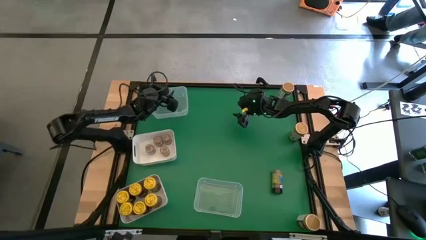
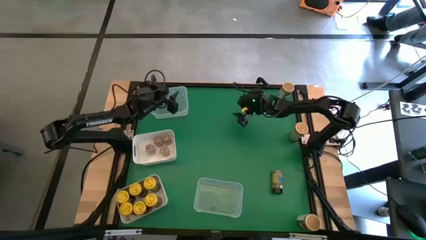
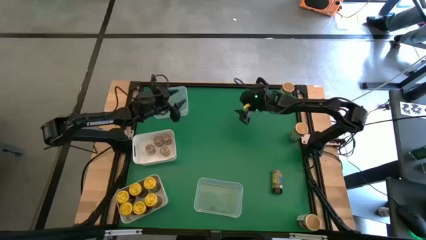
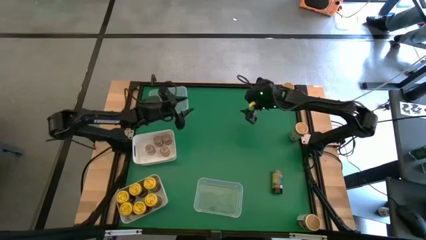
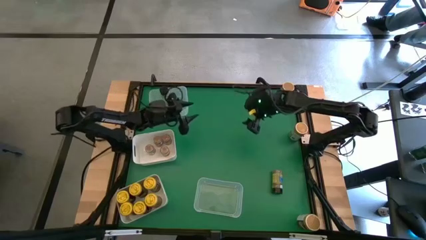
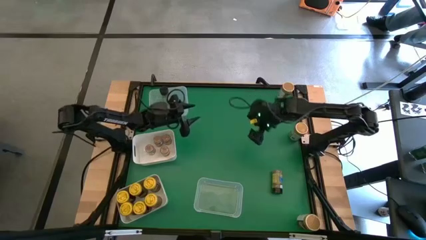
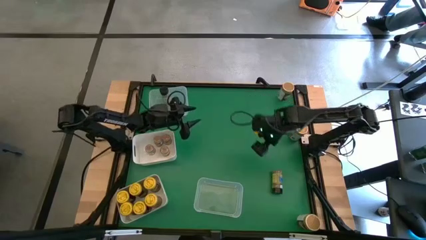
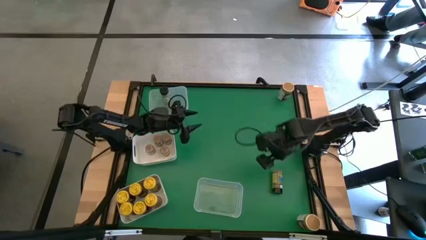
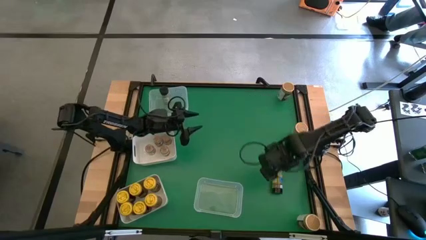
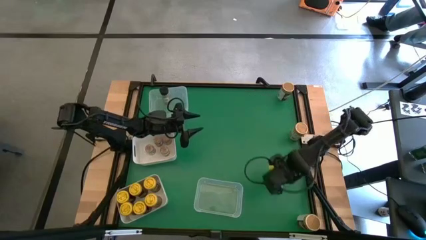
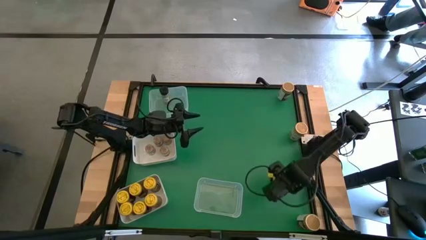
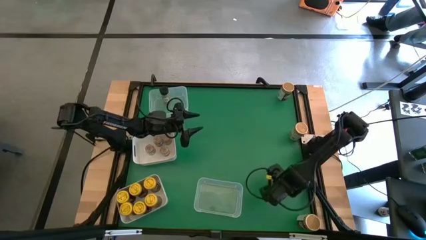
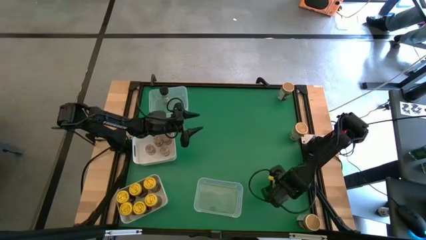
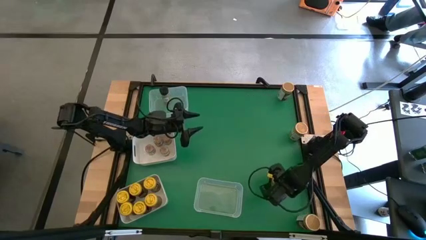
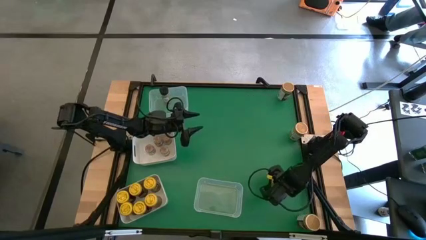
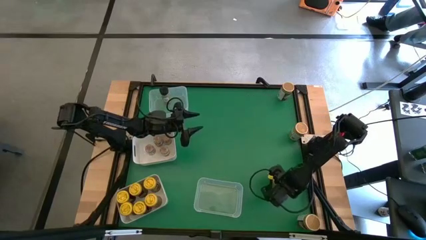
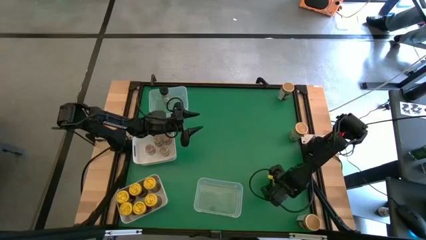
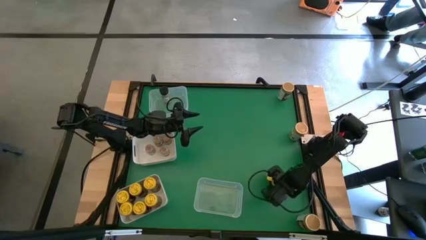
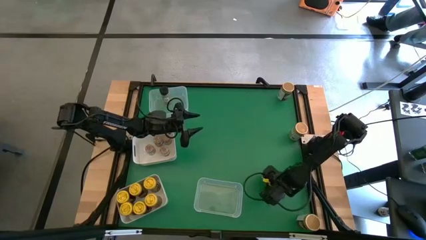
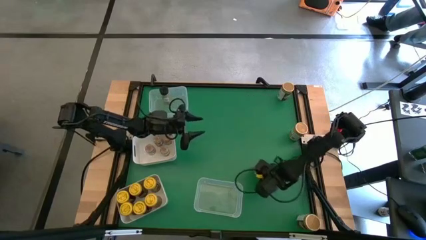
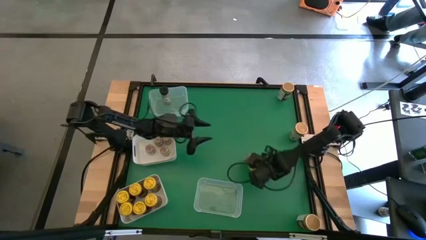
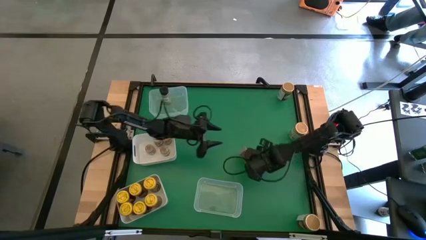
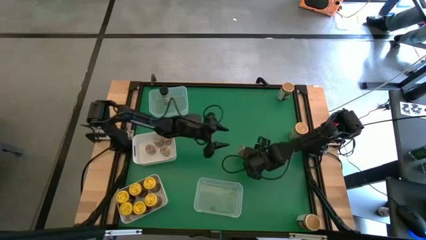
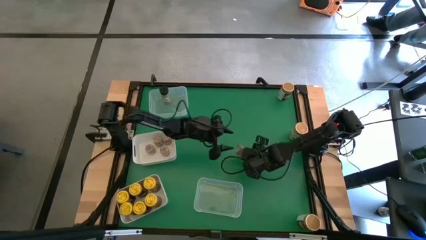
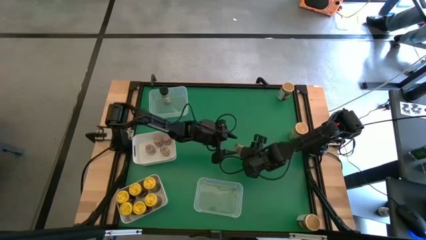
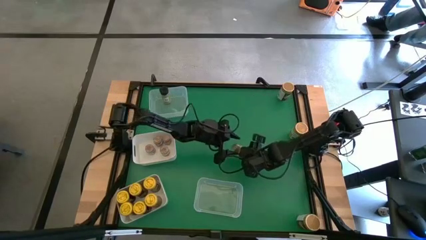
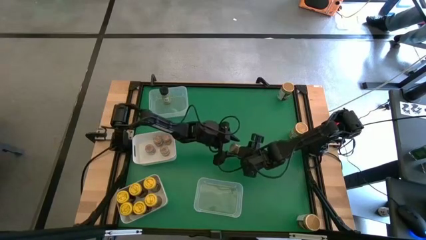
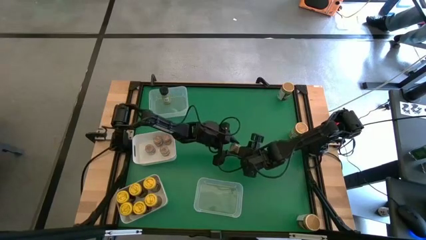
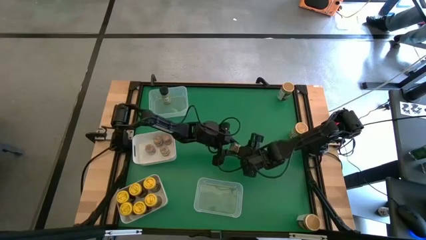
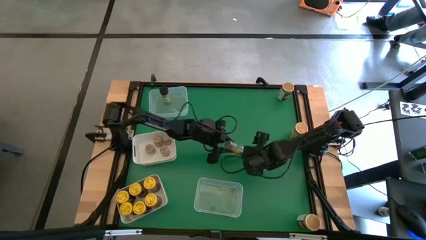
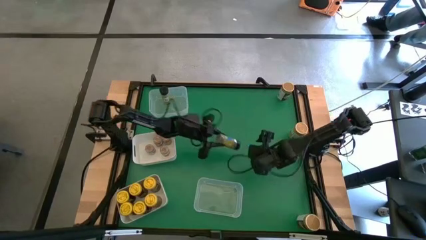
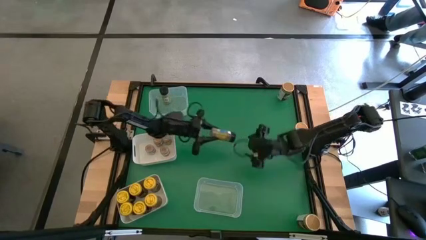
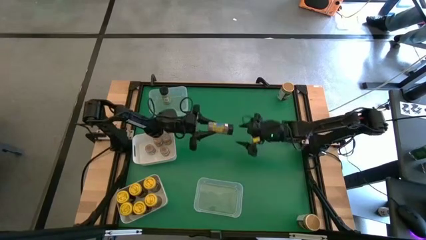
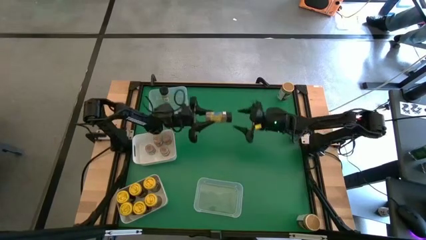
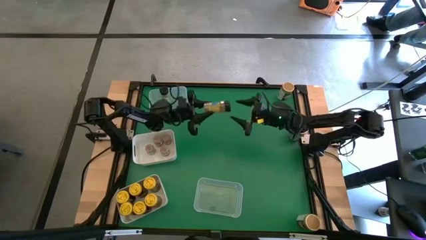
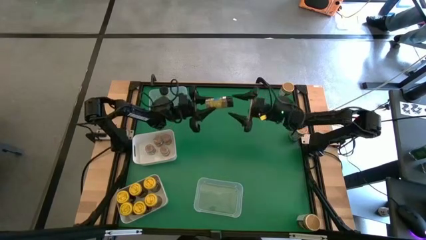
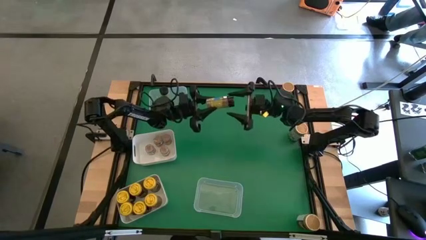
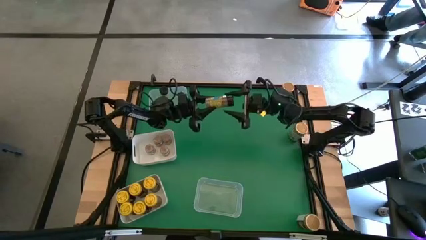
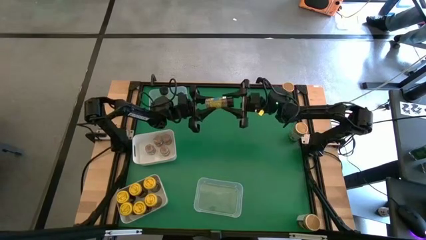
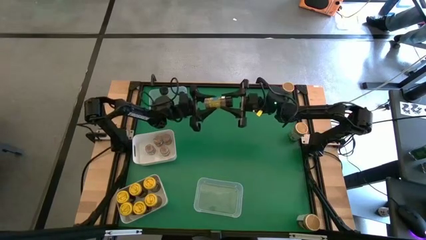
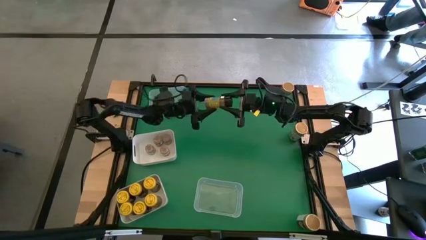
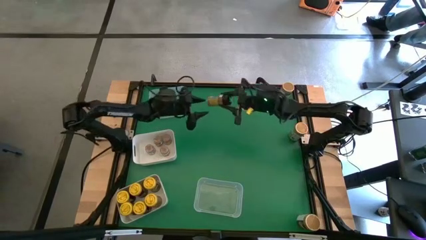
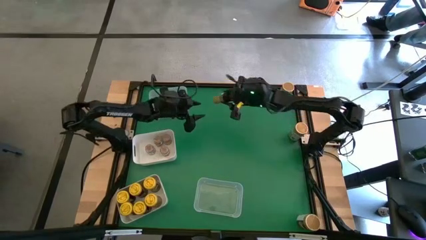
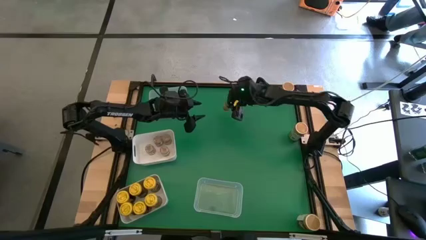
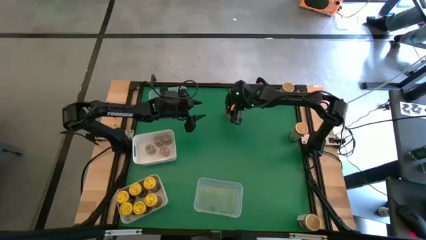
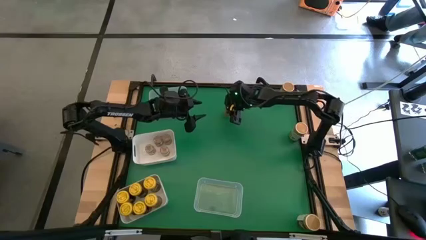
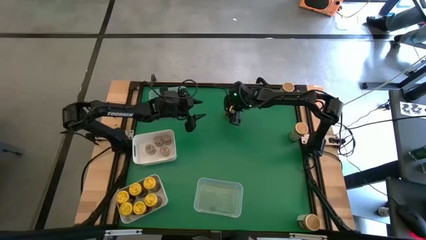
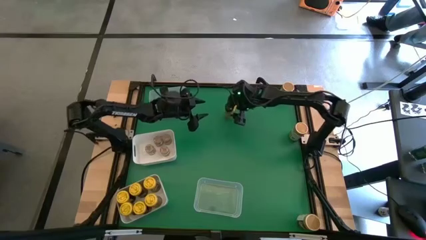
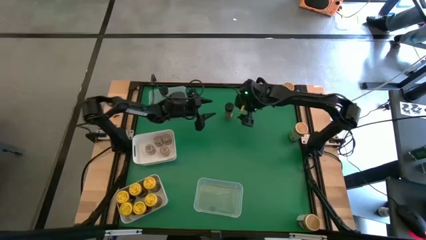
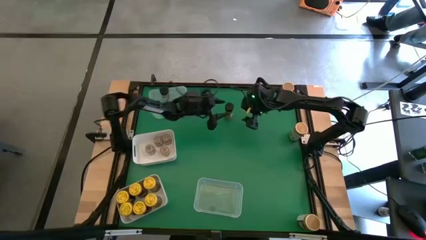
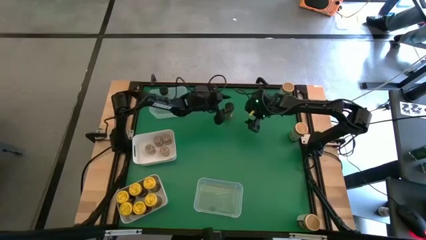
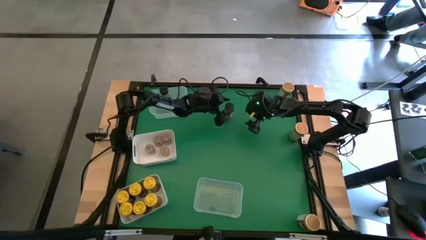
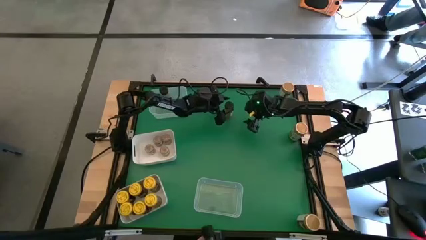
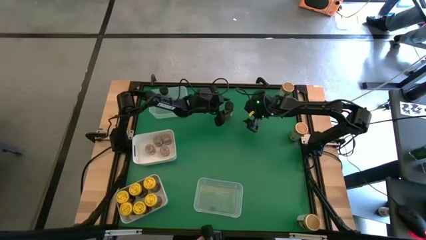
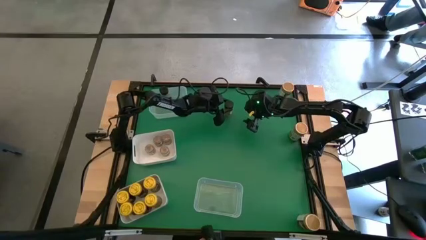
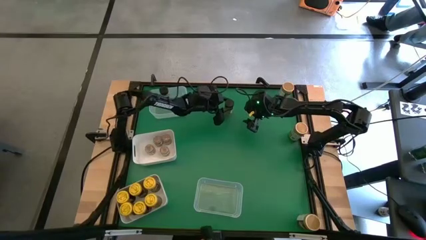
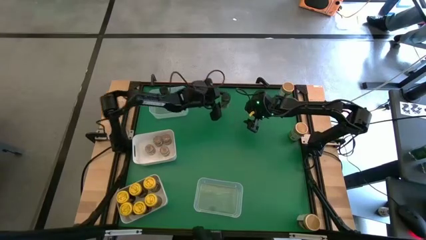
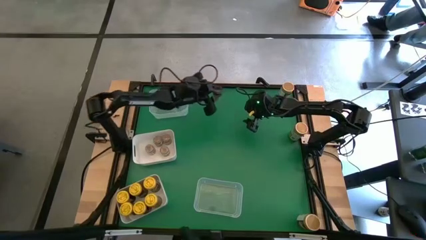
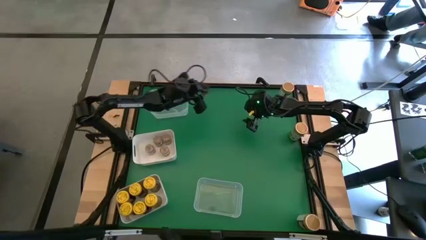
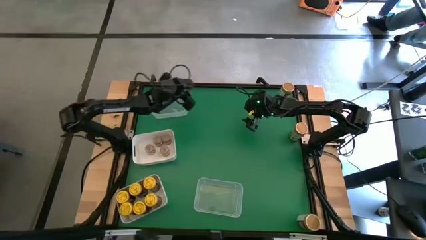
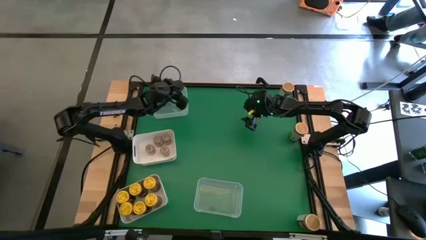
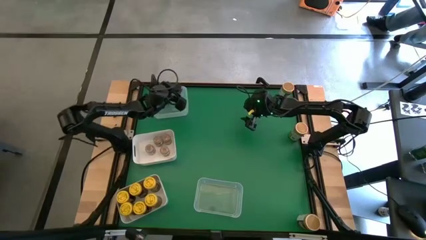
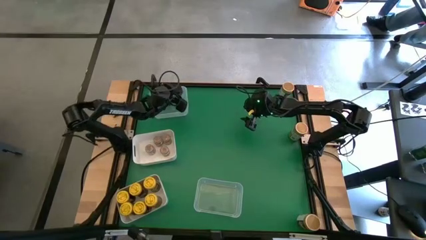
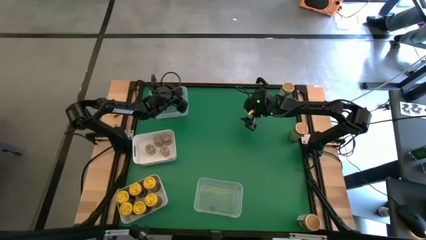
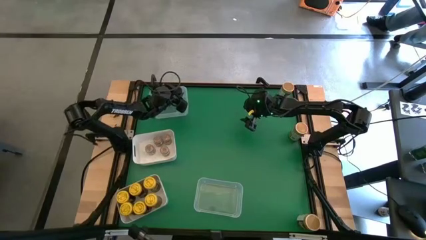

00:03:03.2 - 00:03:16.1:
Task: Sort spices by type
Put the black spice bottle into the top transparent bin

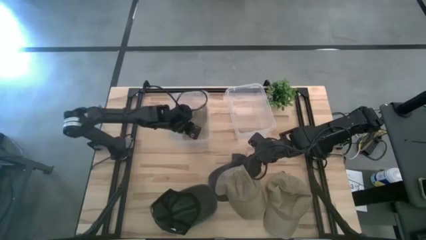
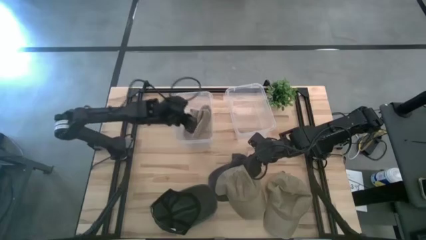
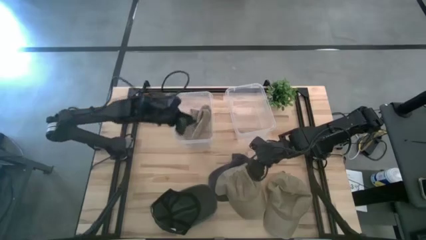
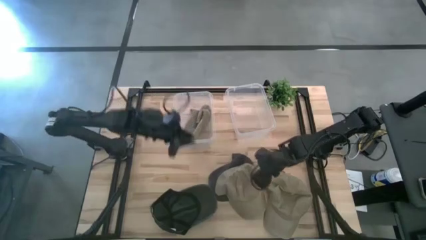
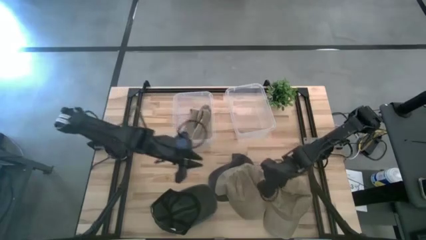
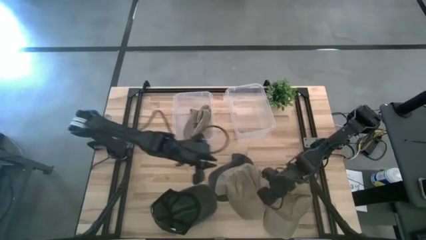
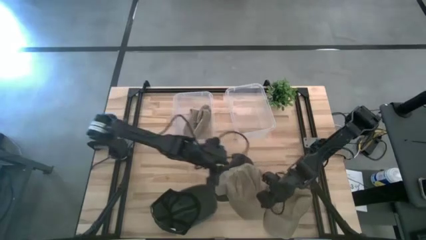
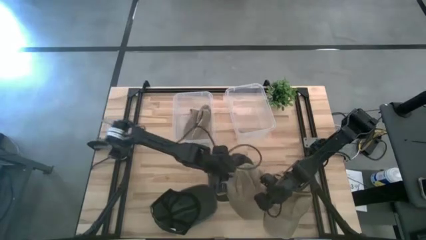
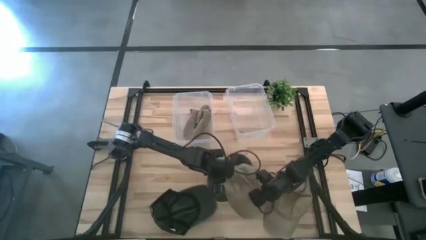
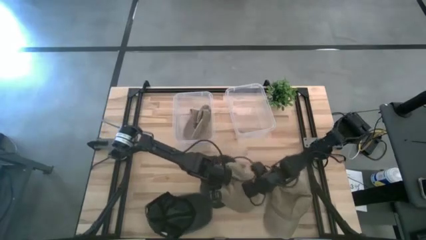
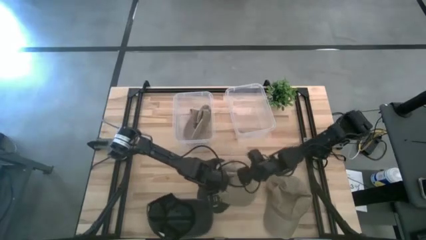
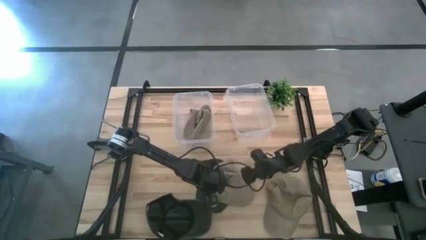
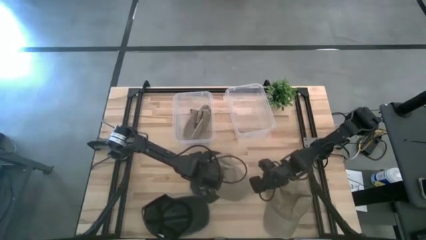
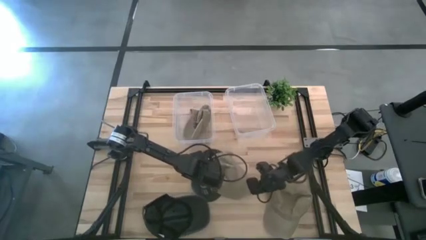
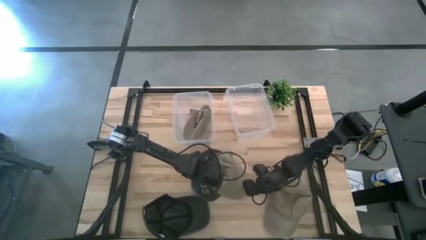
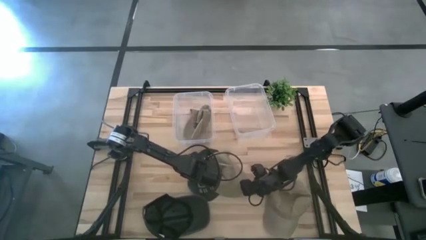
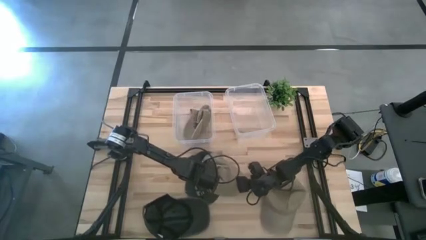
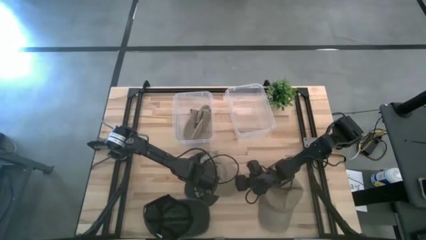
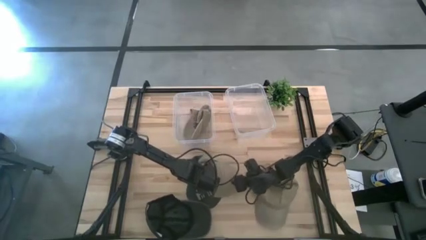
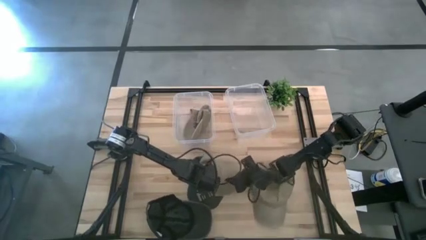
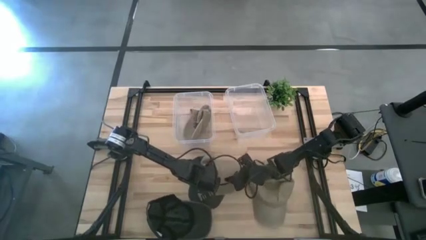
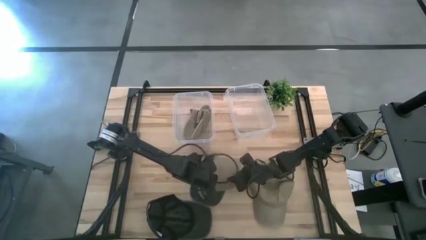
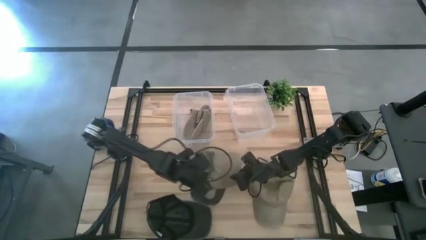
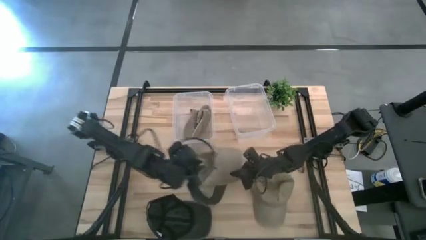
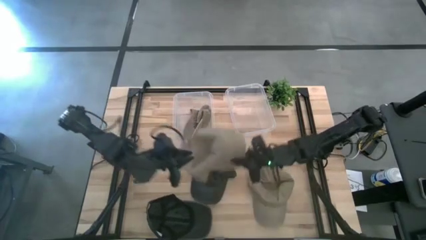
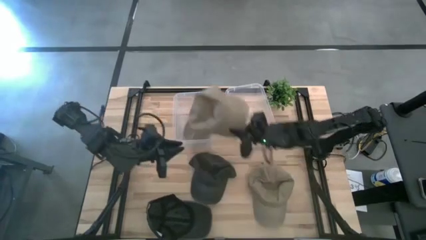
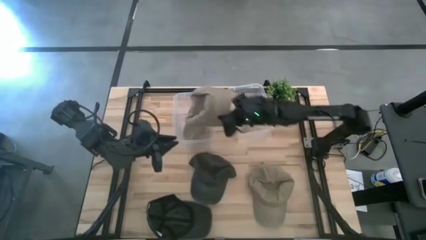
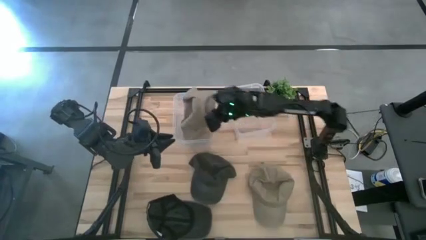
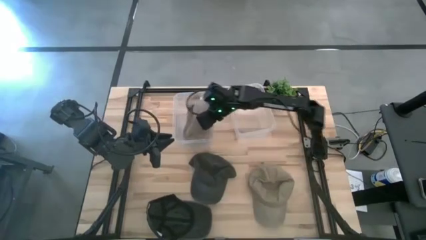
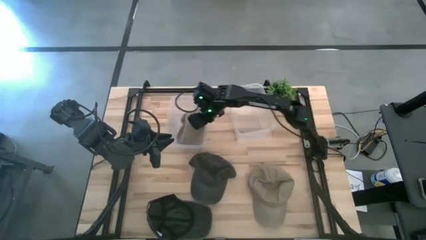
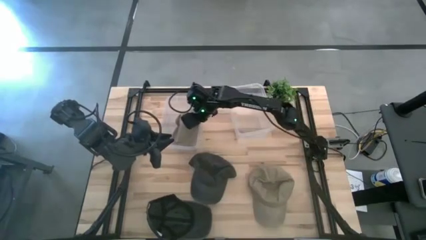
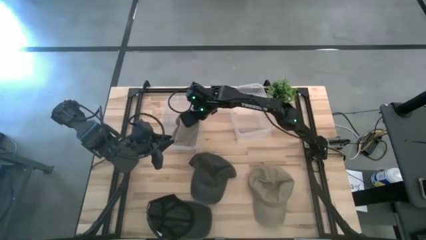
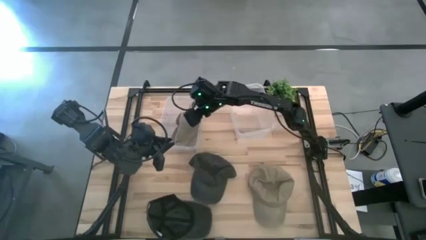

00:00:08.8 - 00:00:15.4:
Task: Pick & Place hat
Put the left brown cap into the left transparent bin
